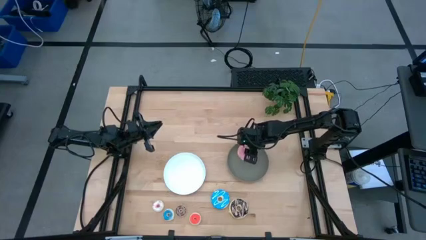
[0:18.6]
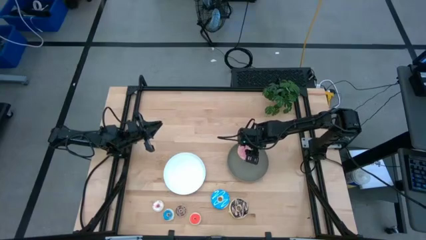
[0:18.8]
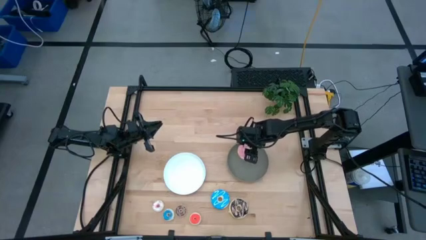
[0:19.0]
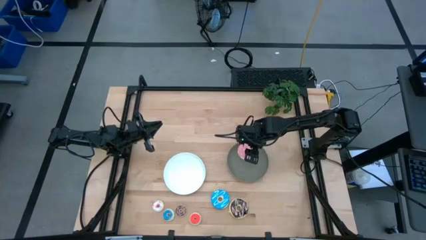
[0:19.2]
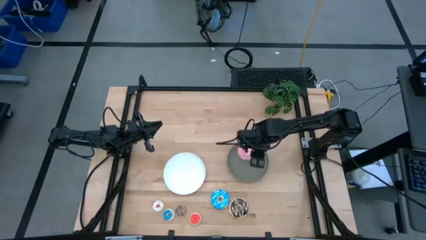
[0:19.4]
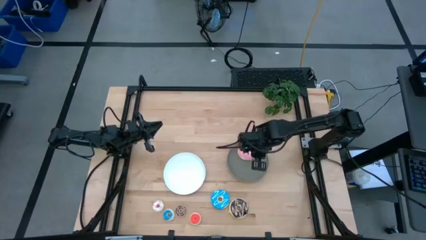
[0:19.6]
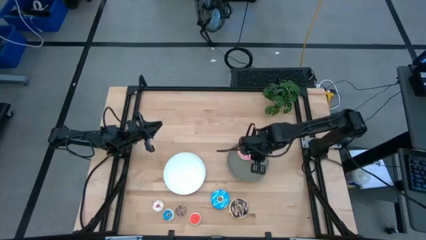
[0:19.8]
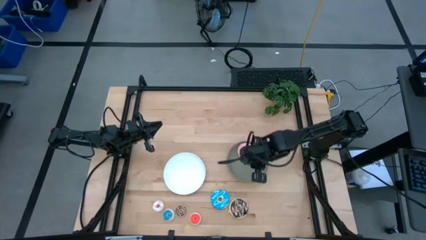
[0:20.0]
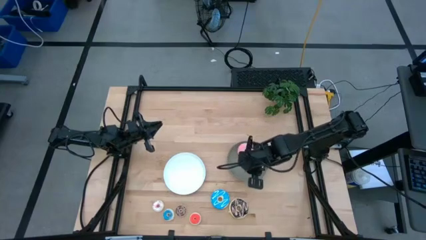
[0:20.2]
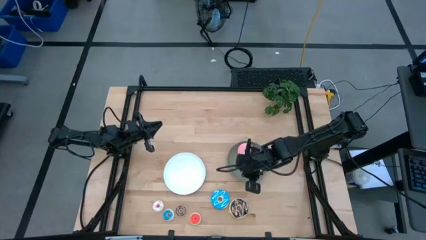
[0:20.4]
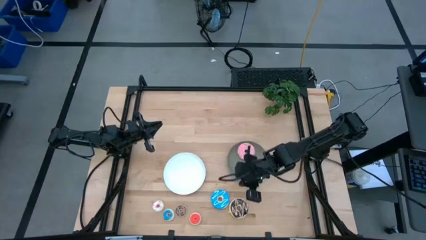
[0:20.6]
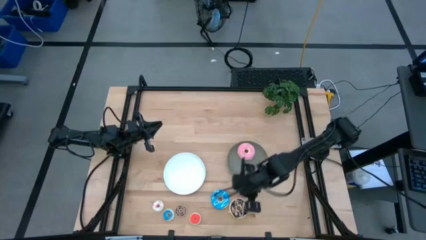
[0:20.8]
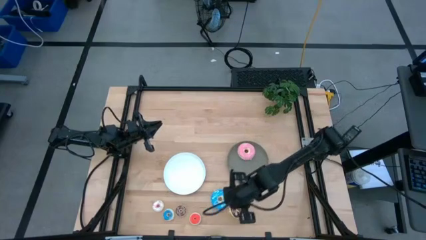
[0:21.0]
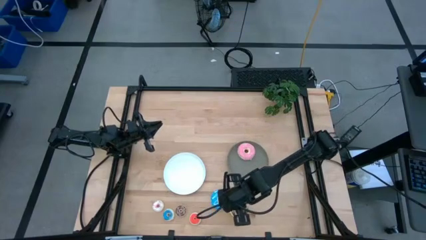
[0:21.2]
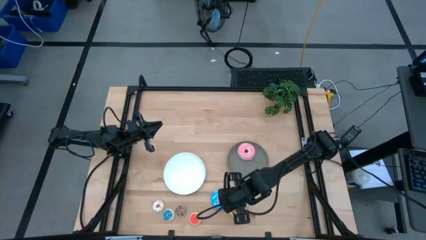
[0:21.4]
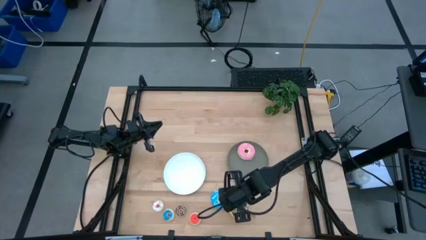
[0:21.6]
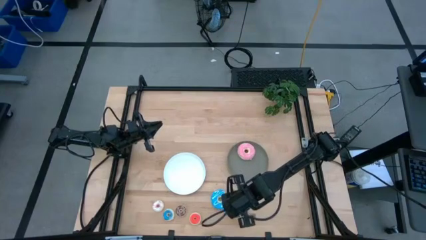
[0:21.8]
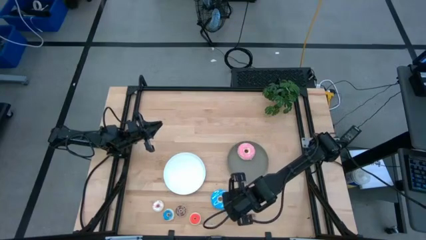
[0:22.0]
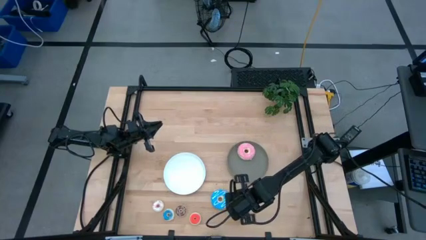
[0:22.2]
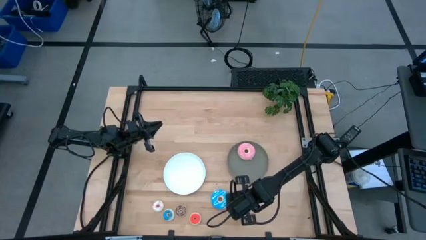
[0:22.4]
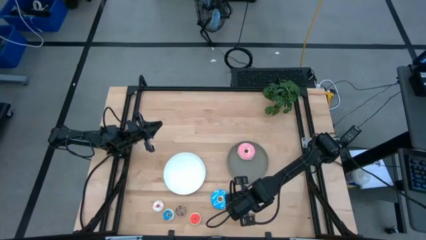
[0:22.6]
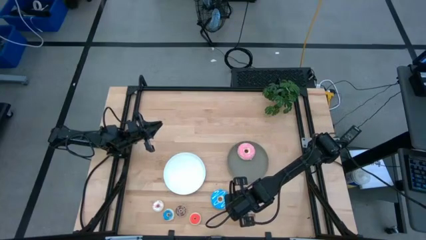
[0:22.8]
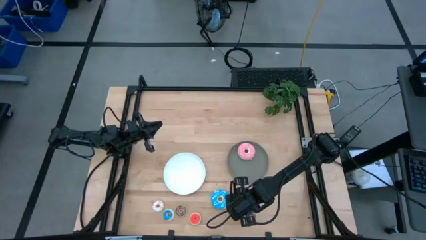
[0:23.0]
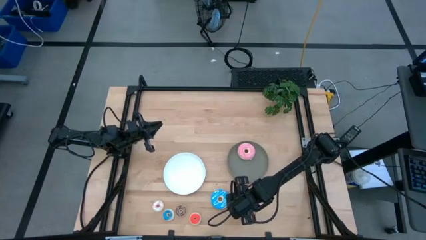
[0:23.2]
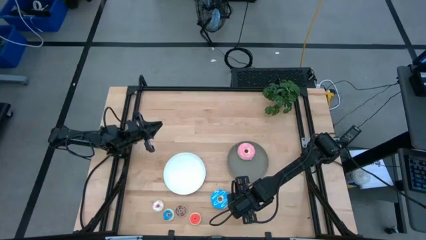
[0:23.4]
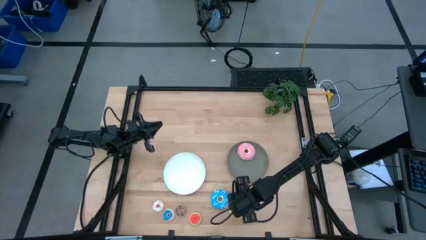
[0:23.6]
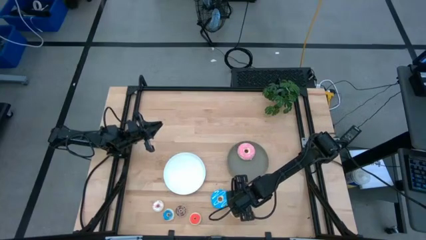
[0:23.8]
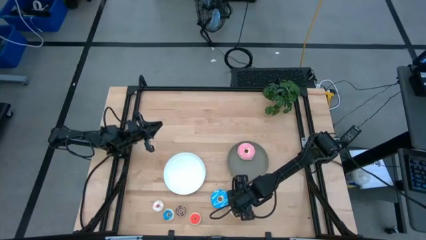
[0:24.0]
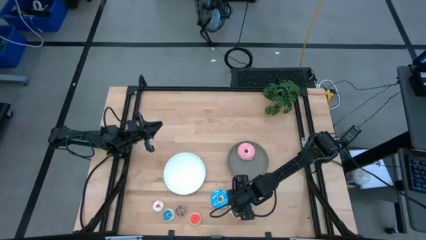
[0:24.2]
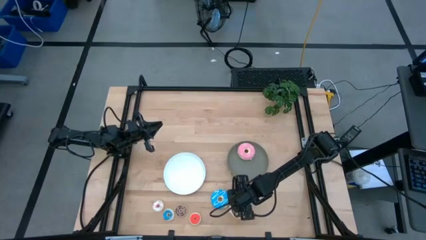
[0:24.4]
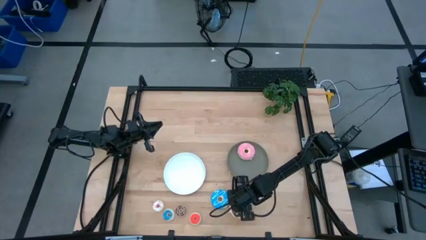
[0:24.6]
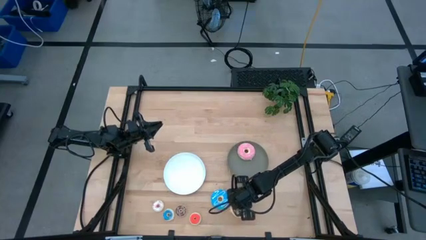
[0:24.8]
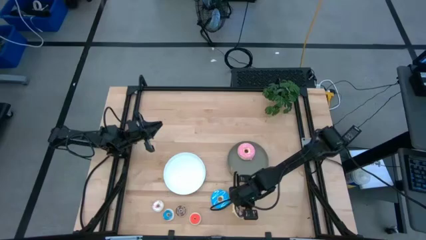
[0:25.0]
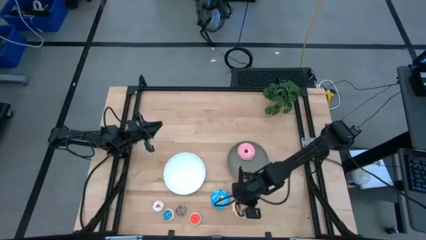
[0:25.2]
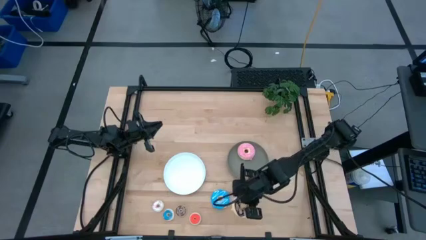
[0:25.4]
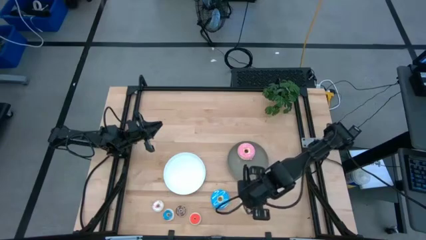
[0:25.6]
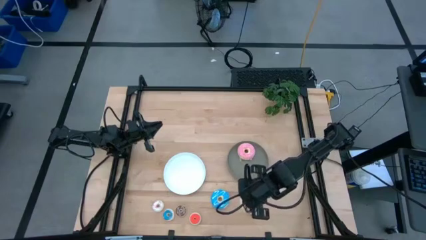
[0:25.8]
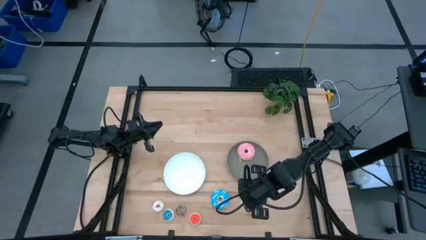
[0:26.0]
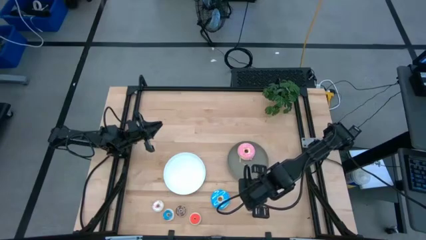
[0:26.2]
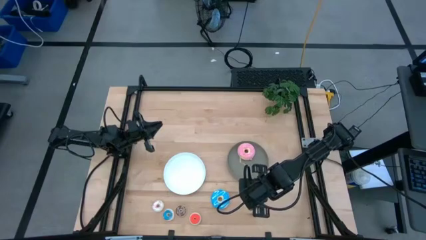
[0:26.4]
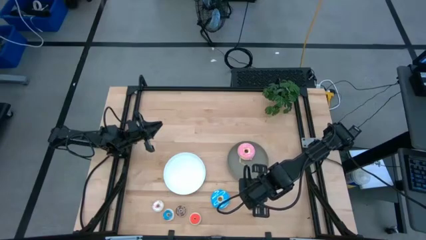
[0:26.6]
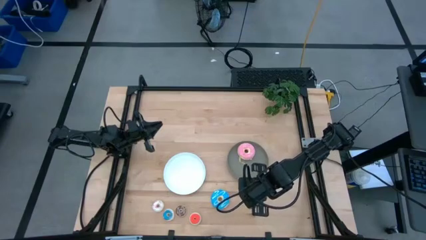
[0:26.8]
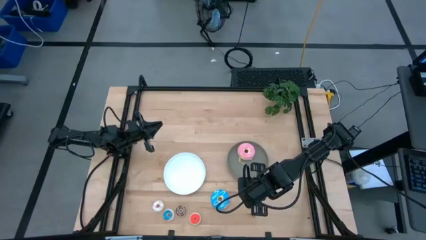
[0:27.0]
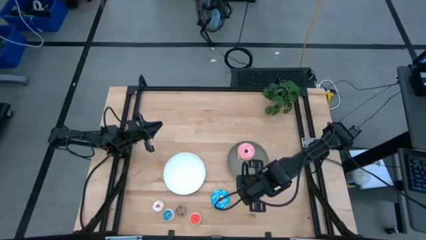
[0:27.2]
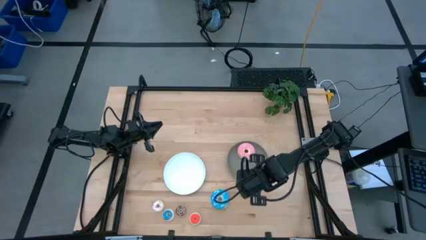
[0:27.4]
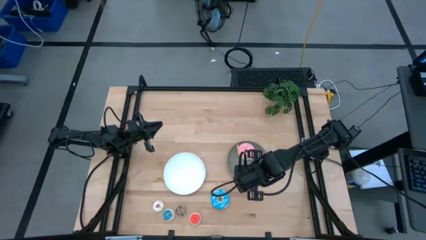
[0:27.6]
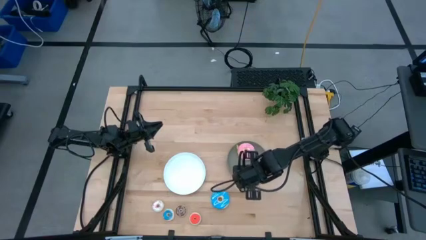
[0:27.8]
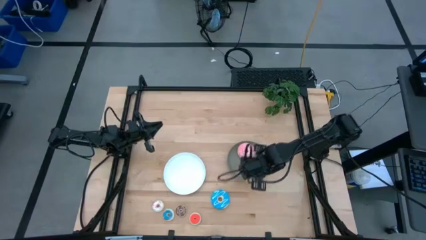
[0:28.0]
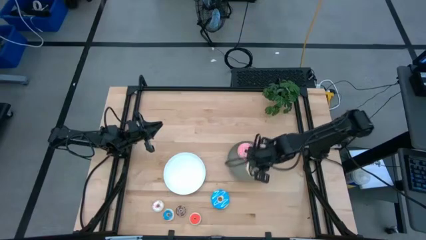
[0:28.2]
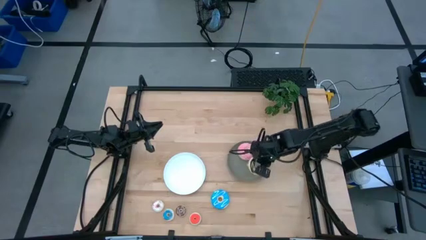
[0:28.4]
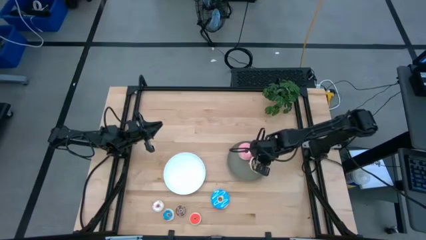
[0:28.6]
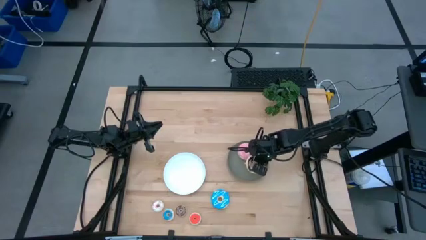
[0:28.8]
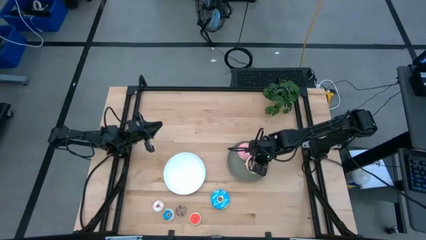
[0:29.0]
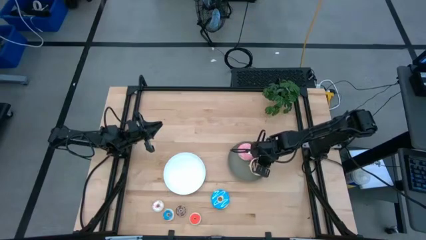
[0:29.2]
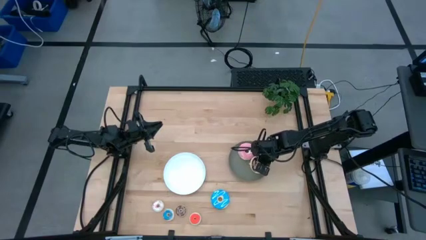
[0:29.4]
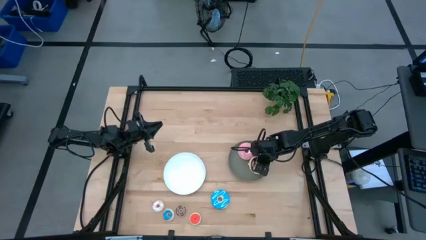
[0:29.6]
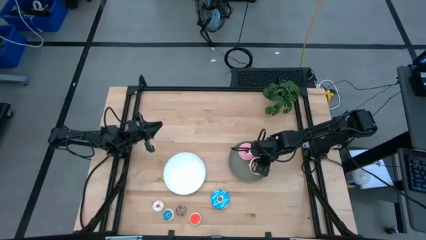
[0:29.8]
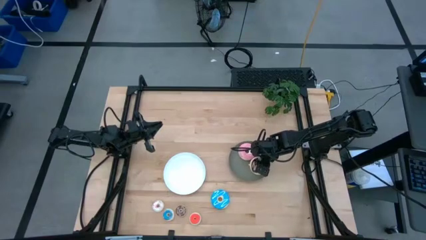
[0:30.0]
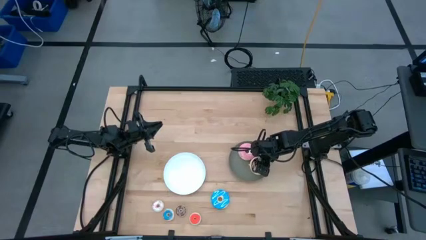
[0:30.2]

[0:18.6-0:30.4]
Task: Pick & Place donuts
Put the large black donut on the gray plate
